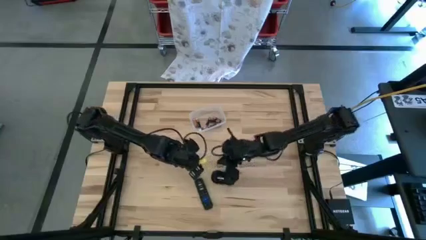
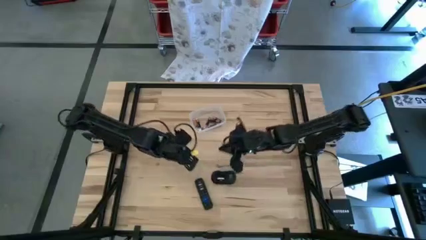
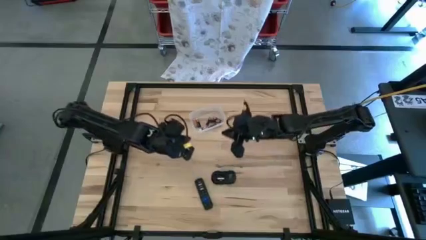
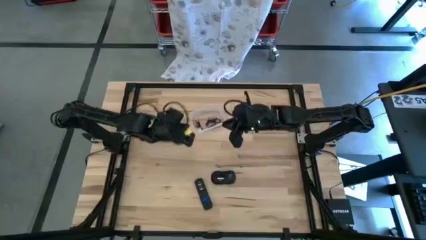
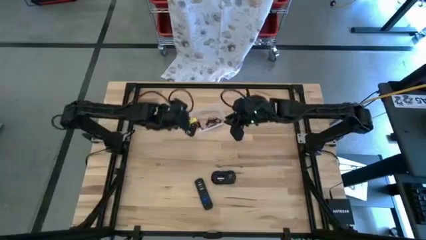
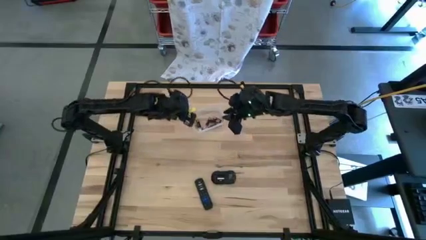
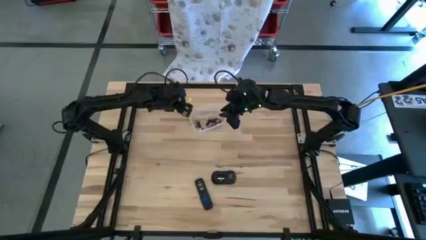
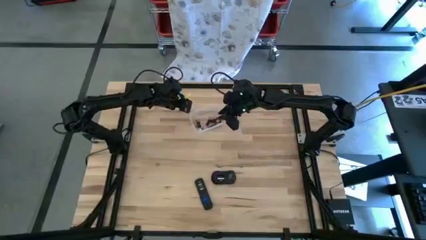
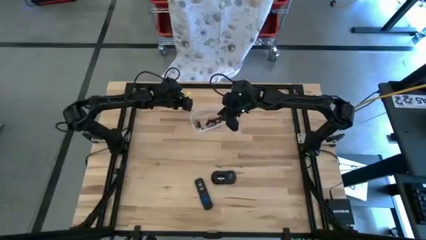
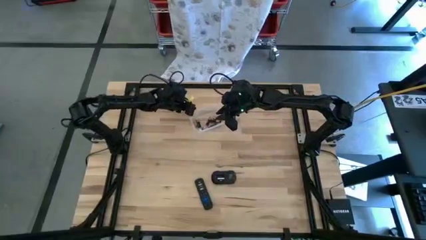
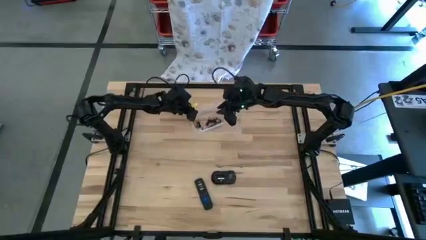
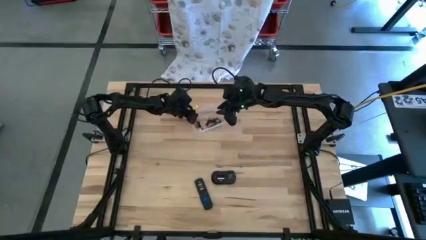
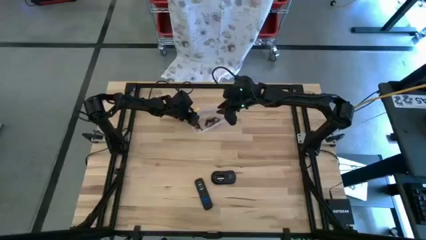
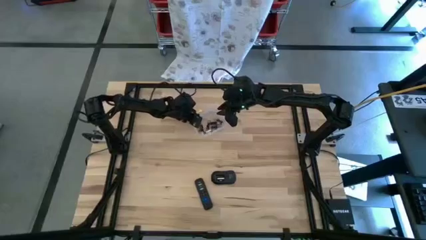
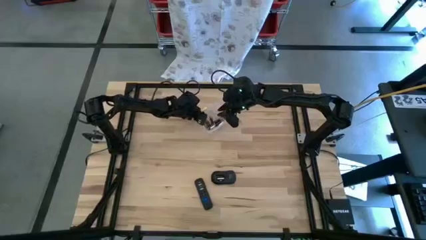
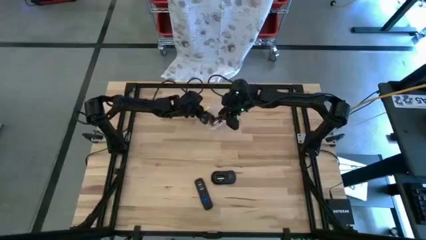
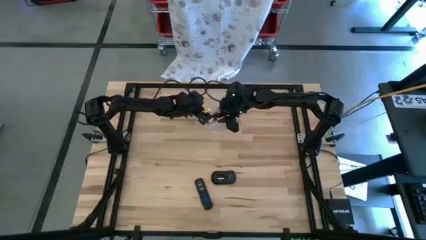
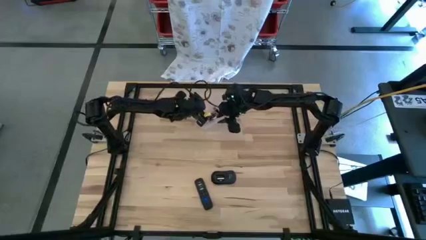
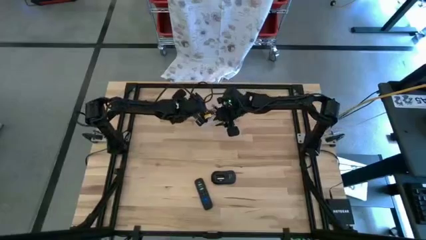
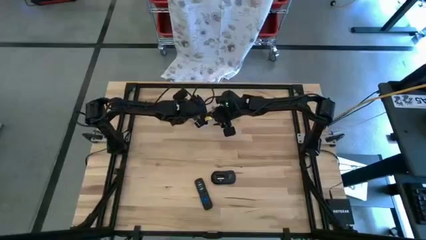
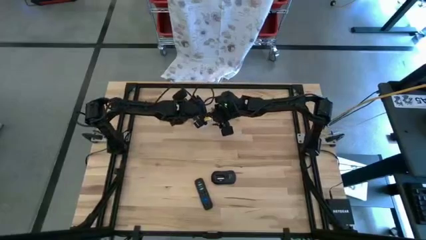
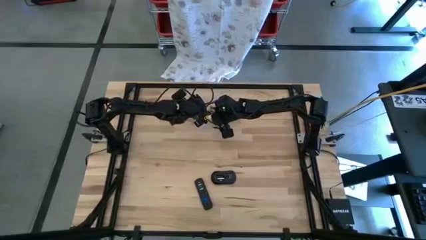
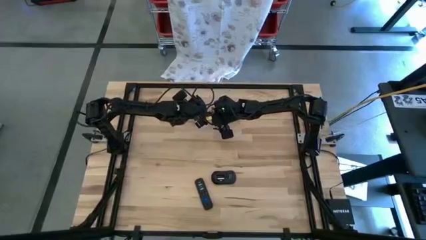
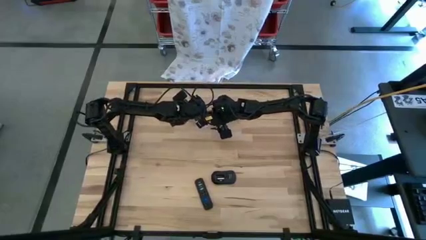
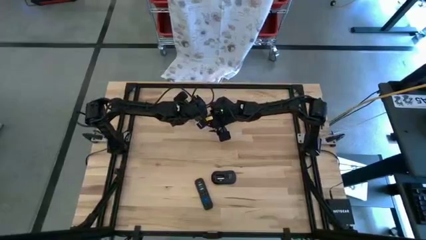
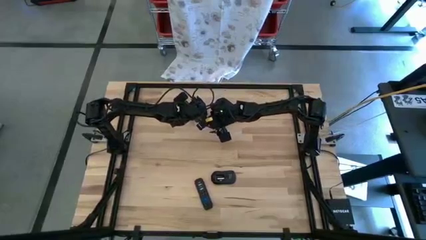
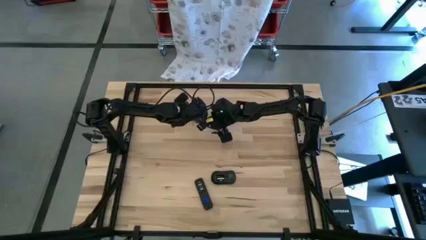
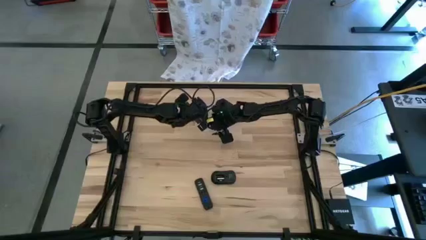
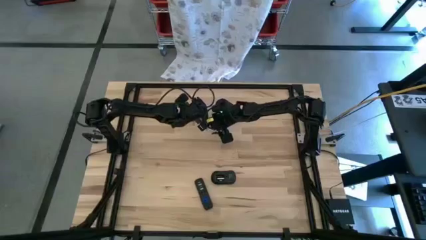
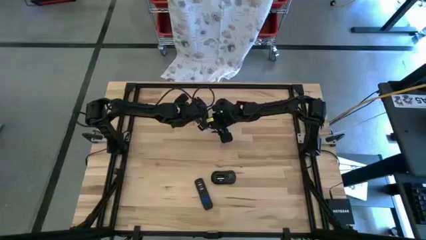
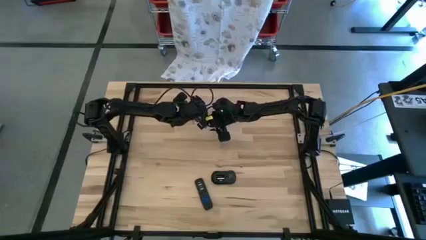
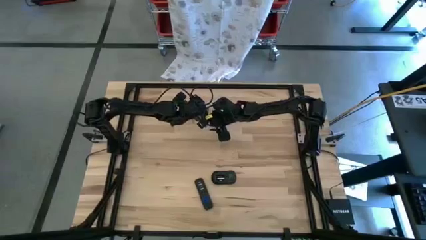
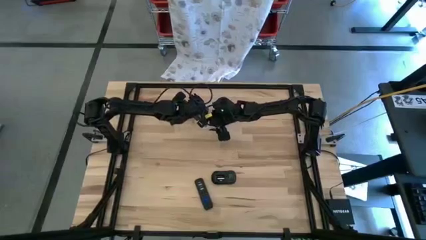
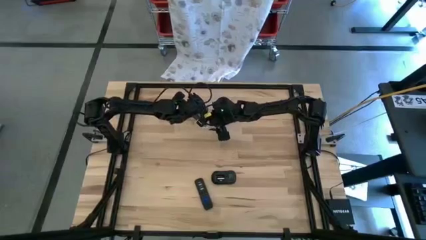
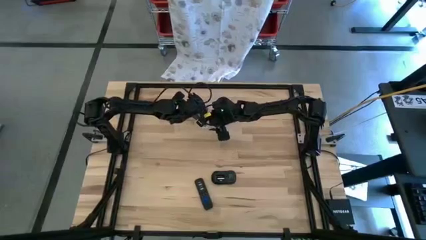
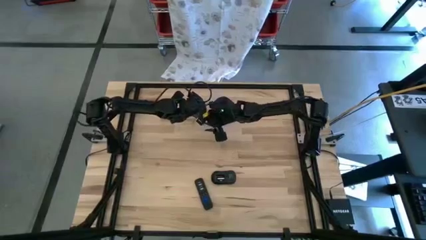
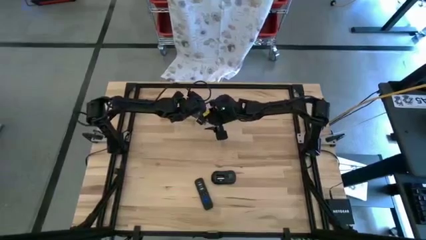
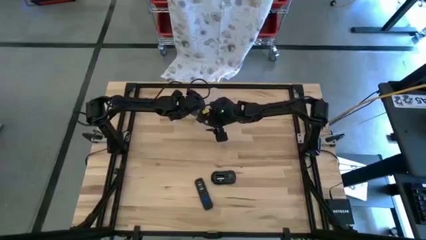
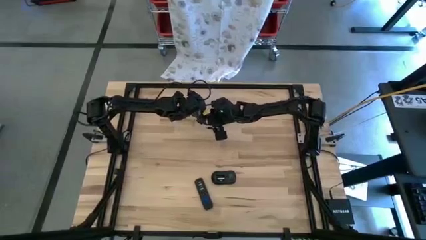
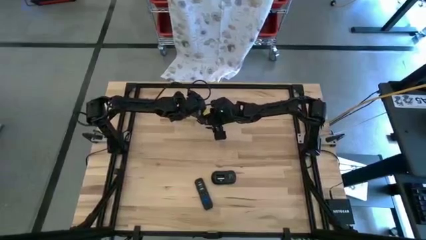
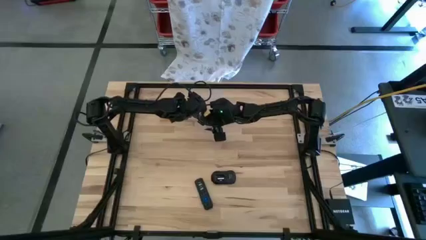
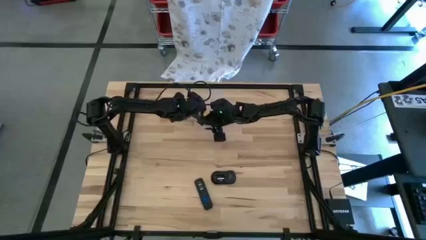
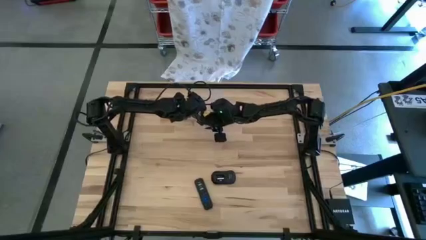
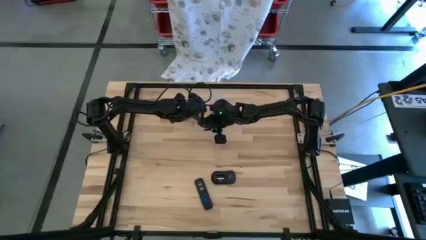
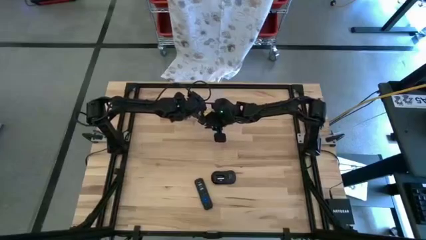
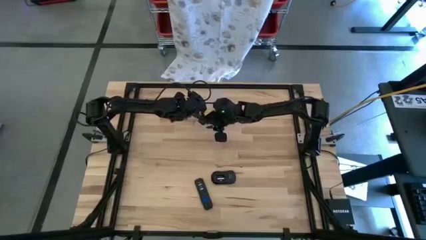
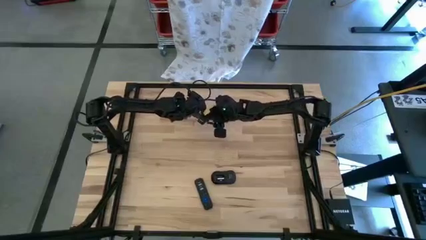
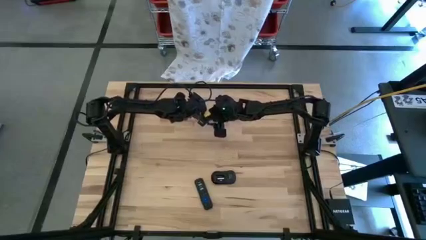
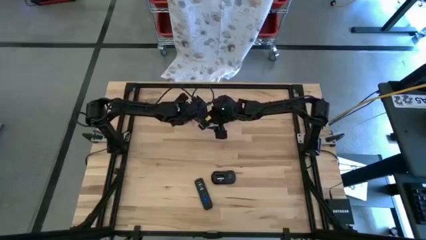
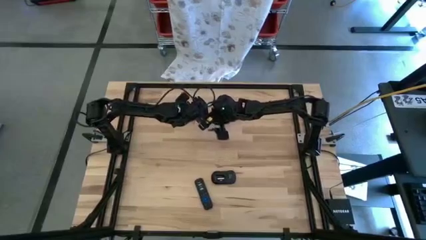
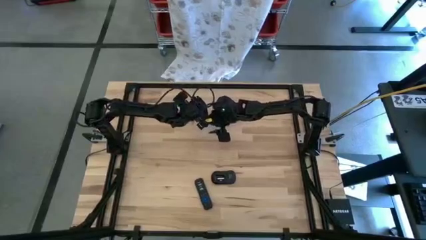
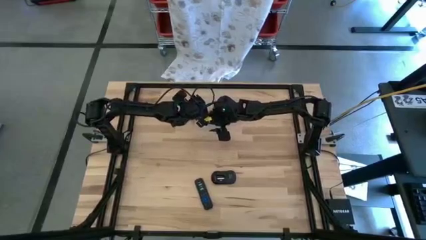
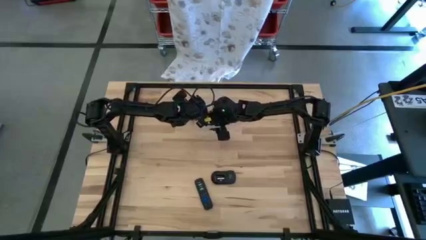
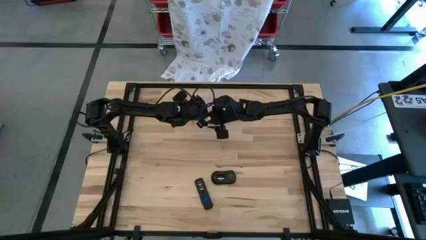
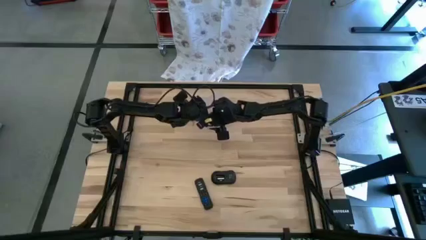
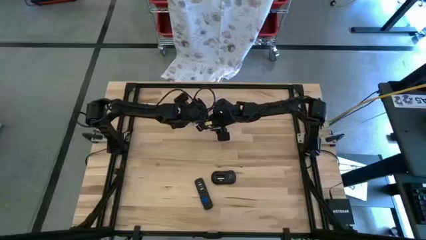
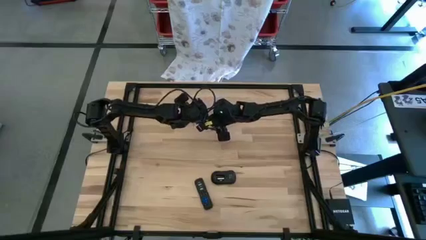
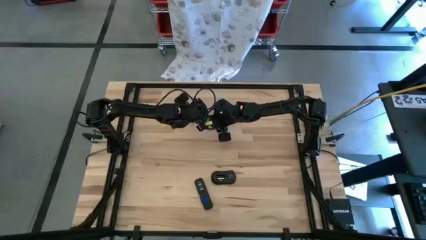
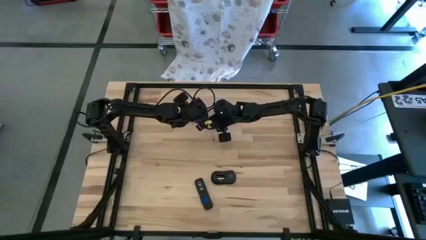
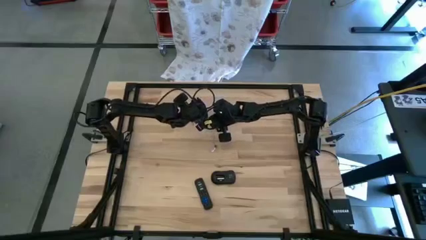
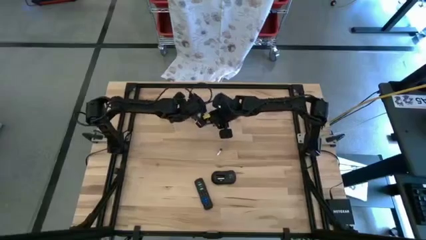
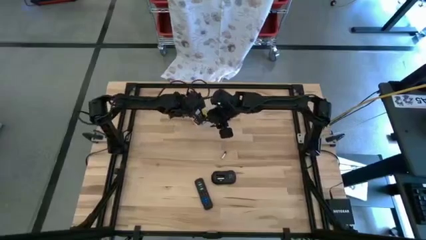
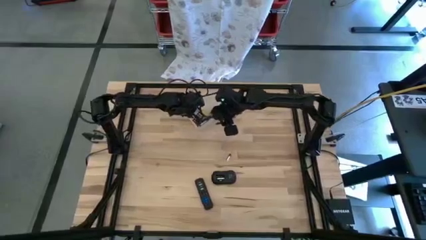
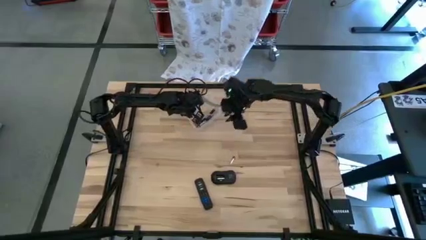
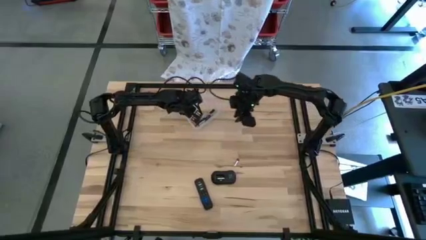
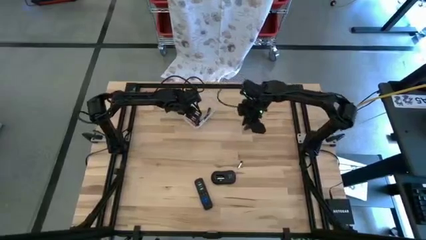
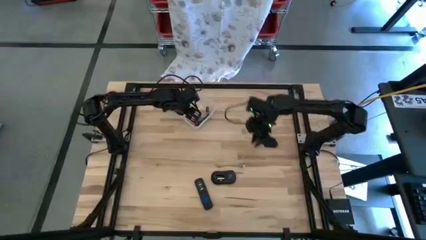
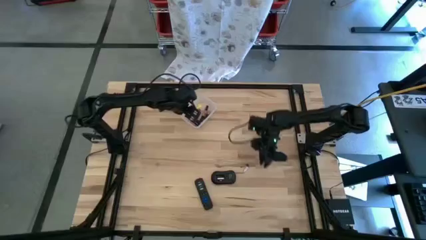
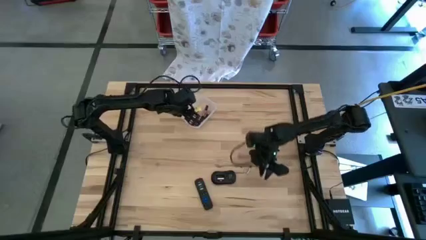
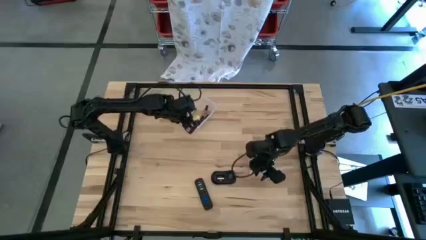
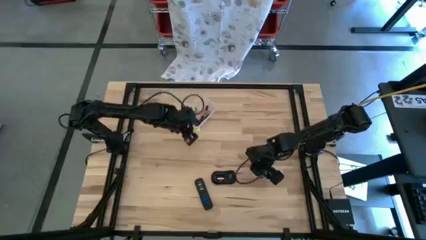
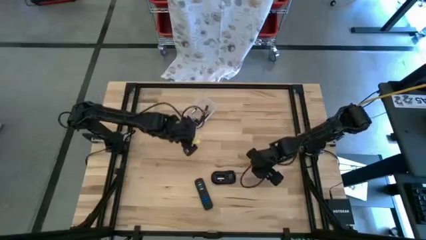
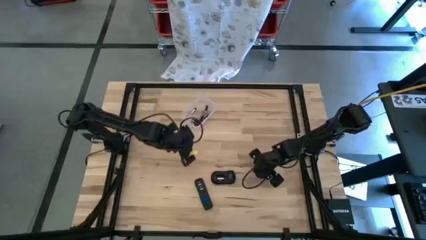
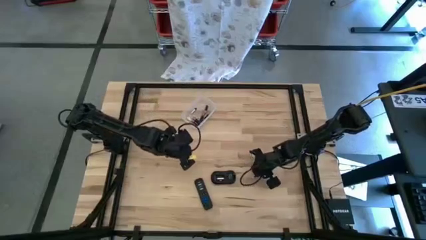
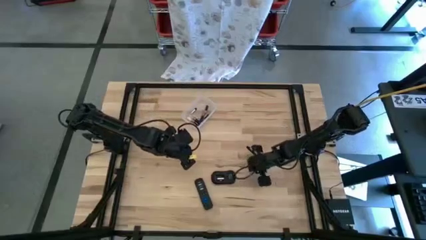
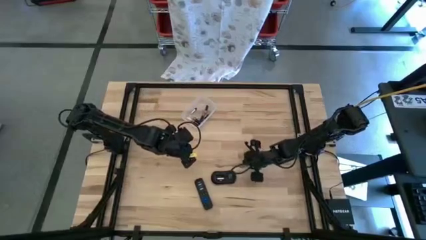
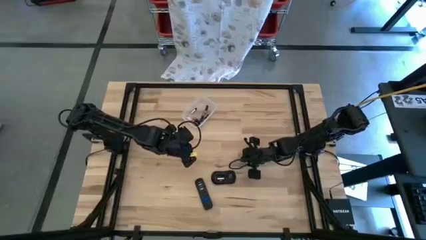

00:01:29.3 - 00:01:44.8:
Task: Insert battery
Insert the small silver battery into the mouse
